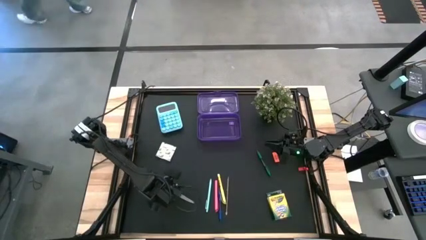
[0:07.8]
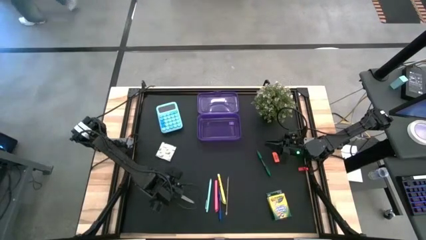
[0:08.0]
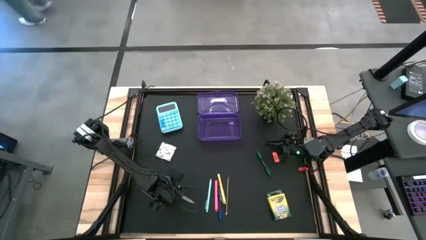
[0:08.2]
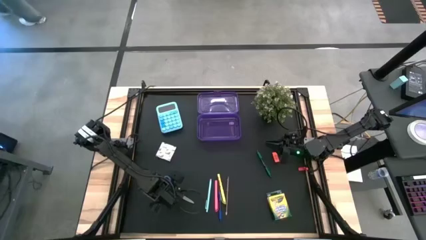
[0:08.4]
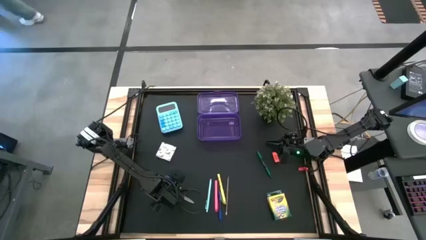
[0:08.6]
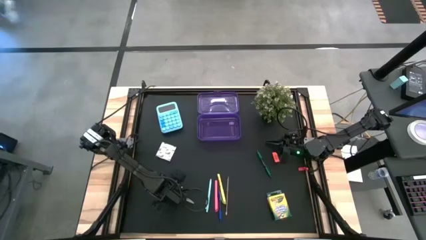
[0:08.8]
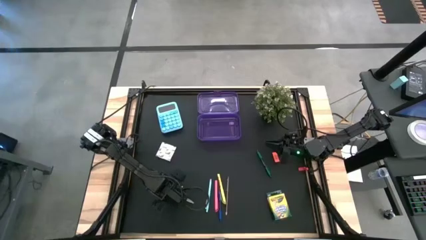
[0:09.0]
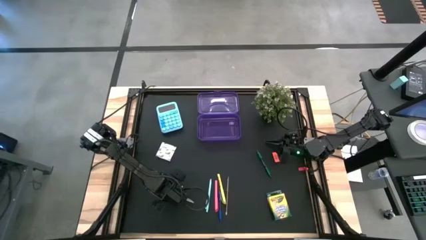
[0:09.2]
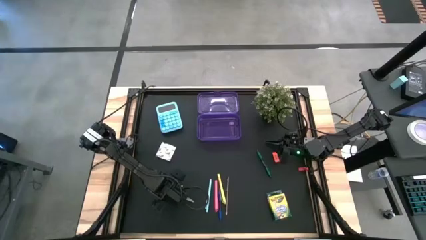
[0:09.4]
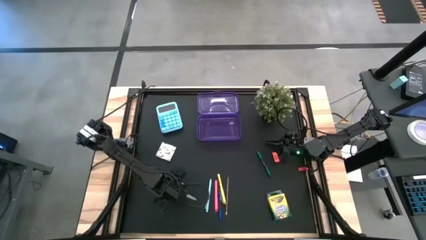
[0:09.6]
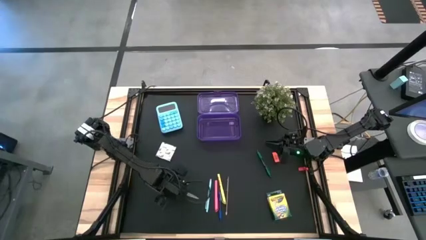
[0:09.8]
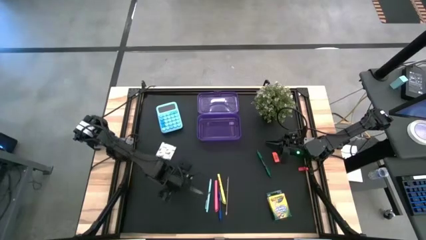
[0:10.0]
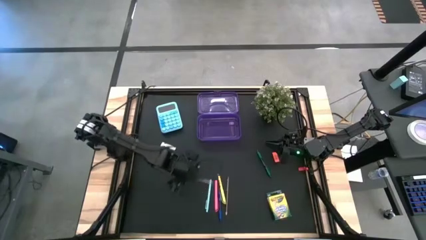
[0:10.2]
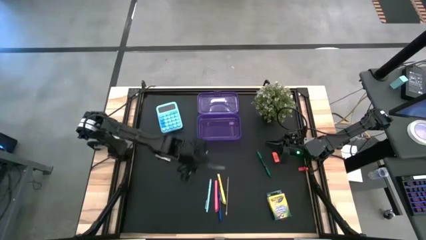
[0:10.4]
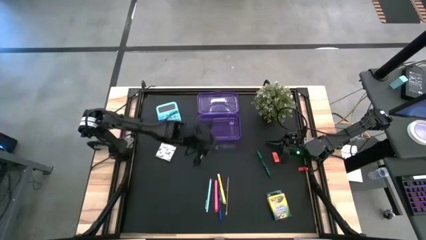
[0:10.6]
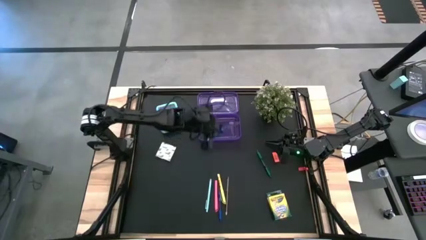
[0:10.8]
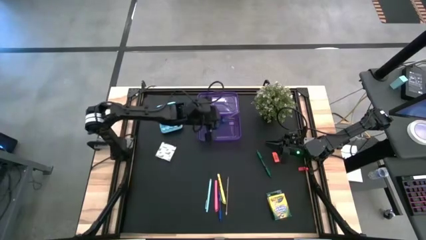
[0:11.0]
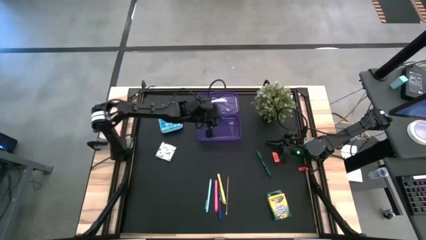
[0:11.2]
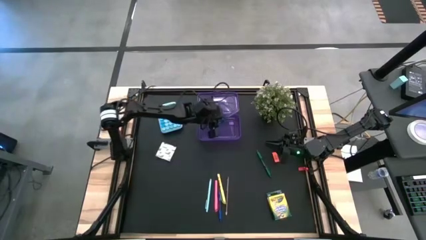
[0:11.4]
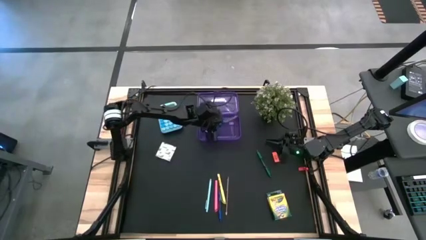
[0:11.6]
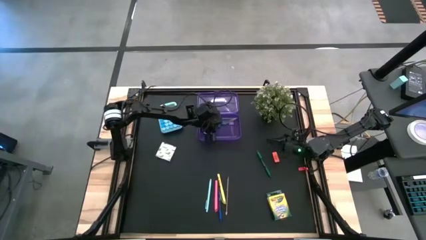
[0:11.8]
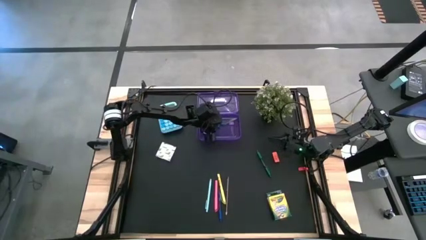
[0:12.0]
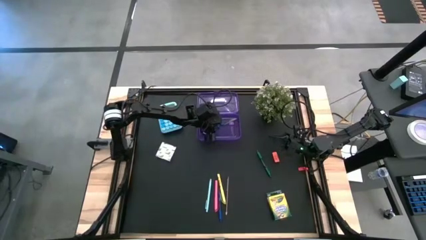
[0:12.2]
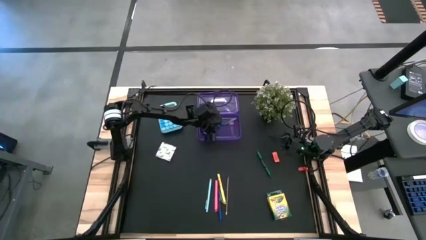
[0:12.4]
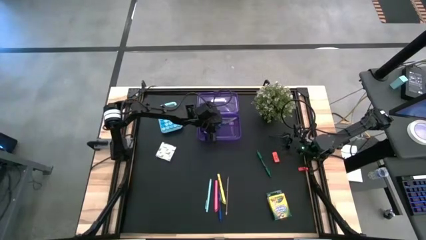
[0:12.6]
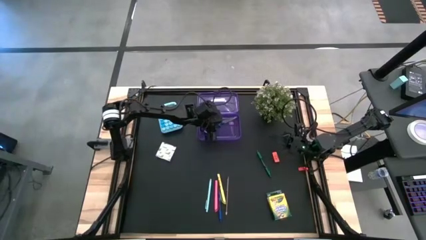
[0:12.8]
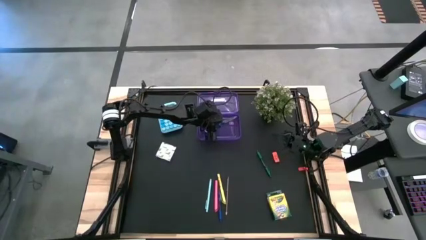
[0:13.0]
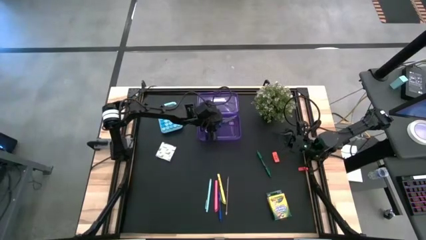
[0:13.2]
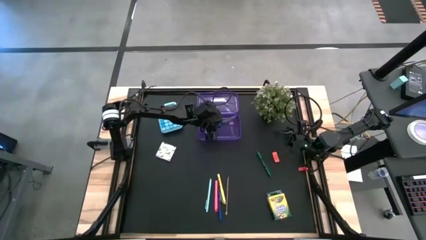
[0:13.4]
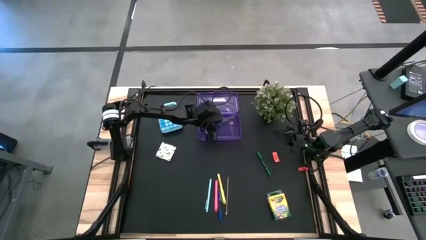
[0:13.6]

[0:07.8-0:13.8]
Task: Pack school essentials
Put the blue scissors into the purple supply box

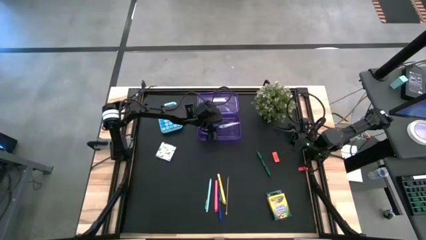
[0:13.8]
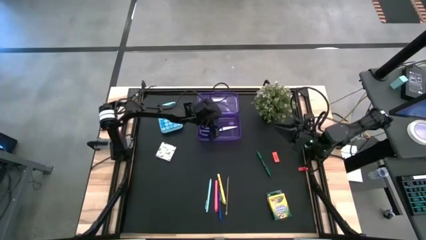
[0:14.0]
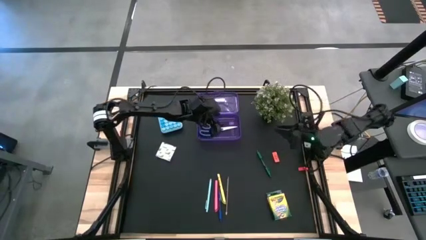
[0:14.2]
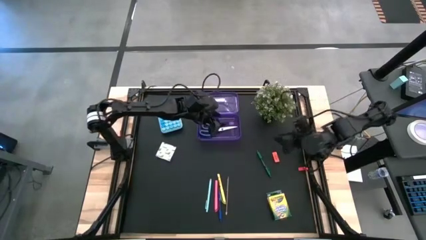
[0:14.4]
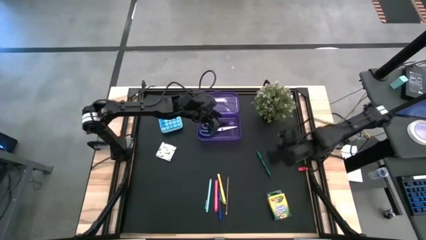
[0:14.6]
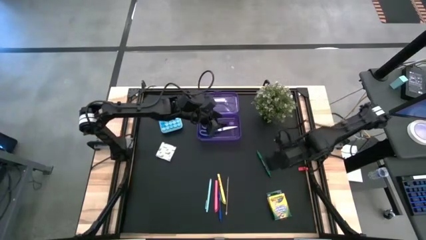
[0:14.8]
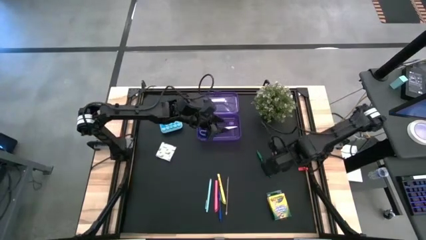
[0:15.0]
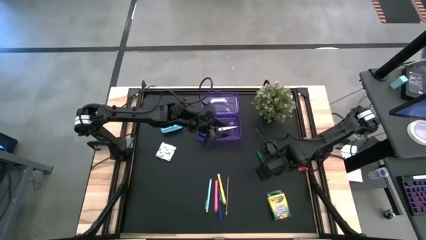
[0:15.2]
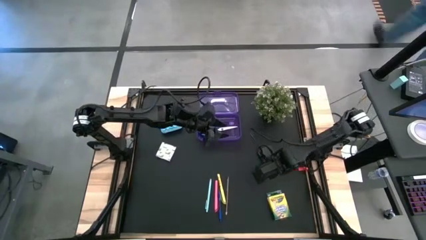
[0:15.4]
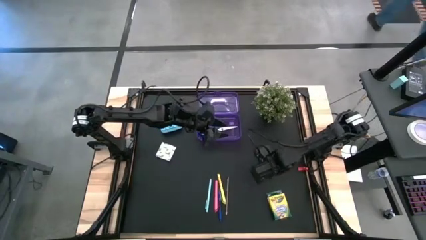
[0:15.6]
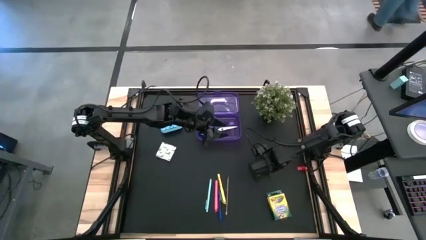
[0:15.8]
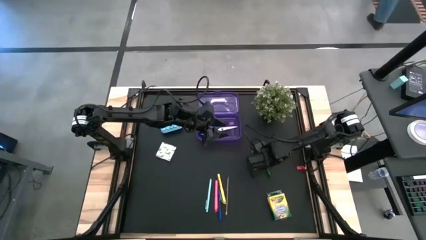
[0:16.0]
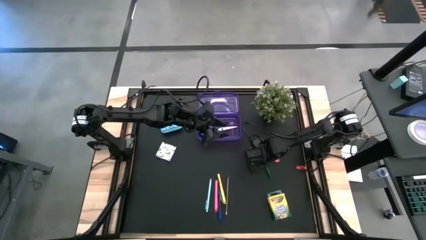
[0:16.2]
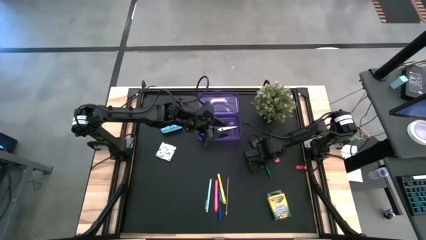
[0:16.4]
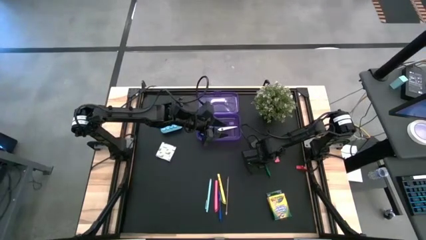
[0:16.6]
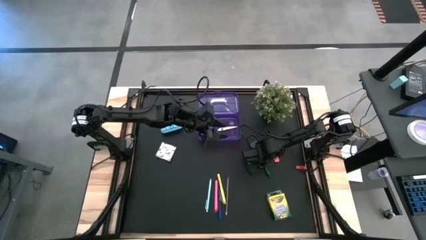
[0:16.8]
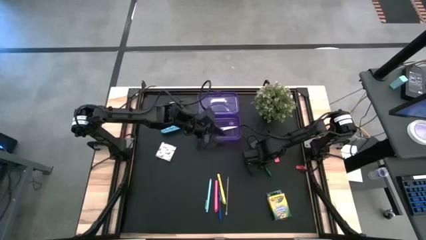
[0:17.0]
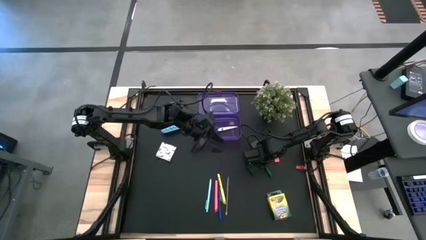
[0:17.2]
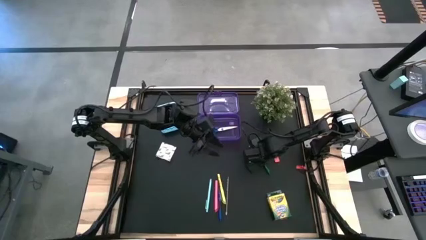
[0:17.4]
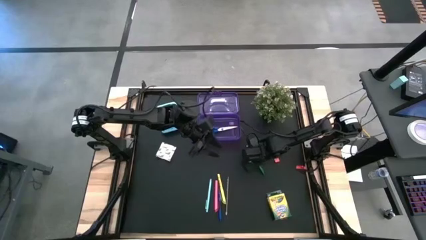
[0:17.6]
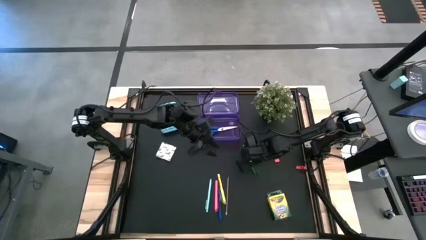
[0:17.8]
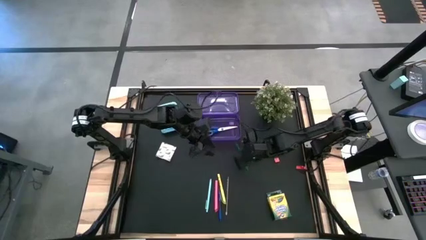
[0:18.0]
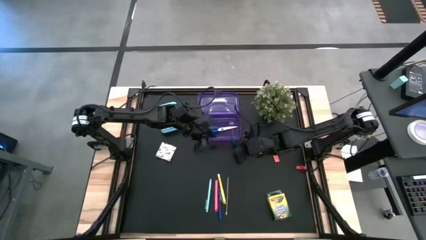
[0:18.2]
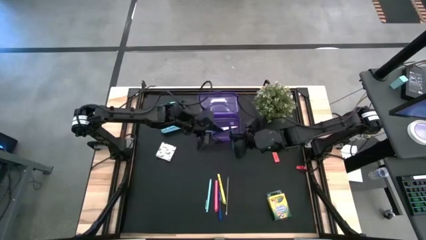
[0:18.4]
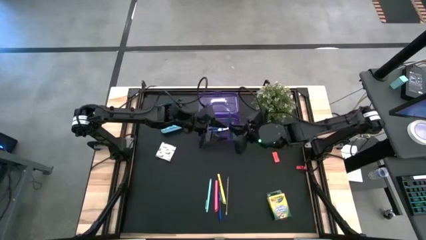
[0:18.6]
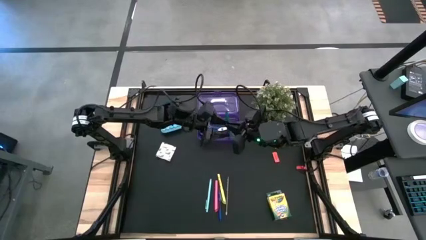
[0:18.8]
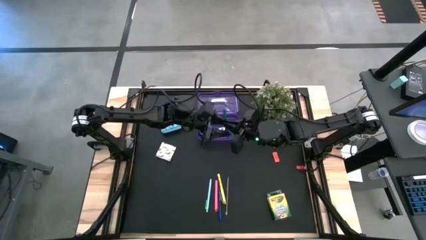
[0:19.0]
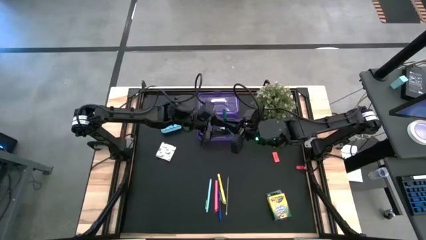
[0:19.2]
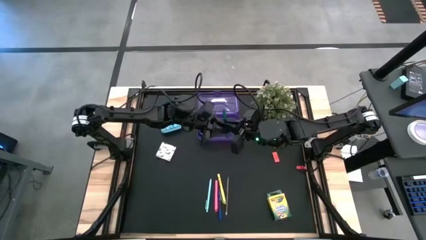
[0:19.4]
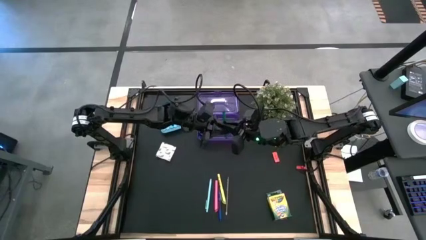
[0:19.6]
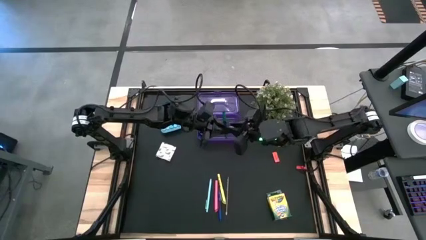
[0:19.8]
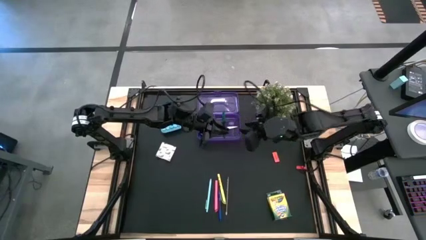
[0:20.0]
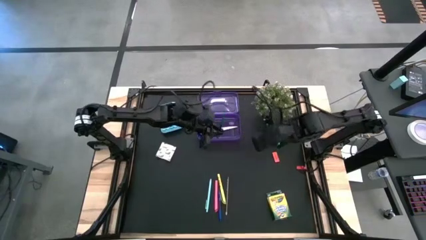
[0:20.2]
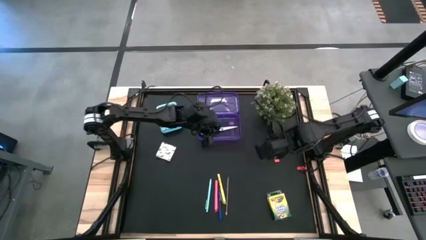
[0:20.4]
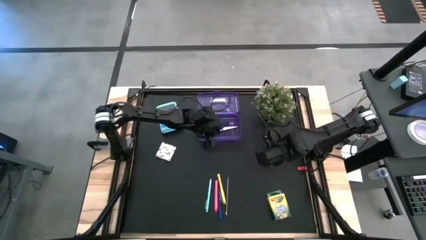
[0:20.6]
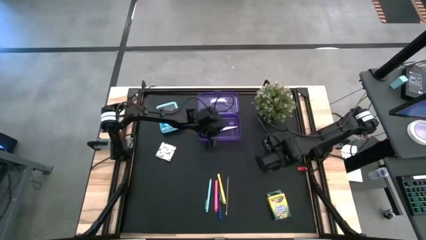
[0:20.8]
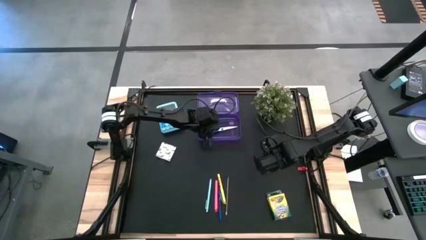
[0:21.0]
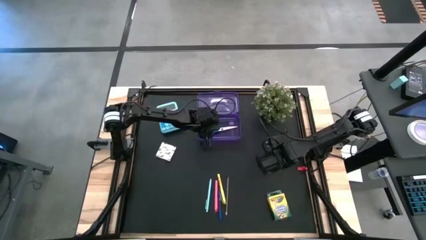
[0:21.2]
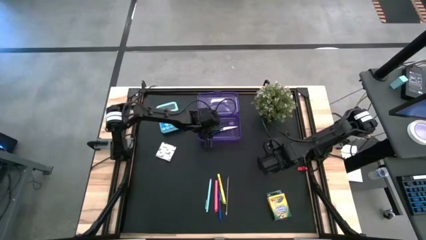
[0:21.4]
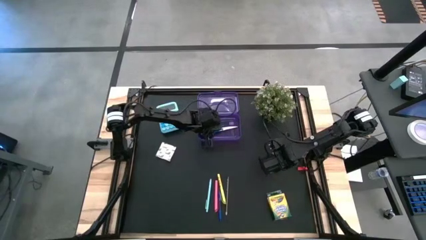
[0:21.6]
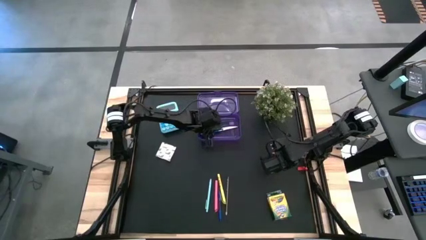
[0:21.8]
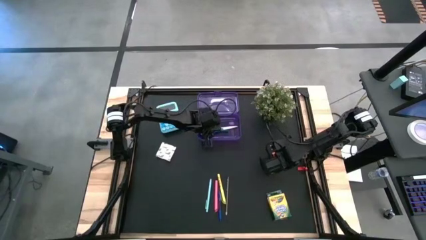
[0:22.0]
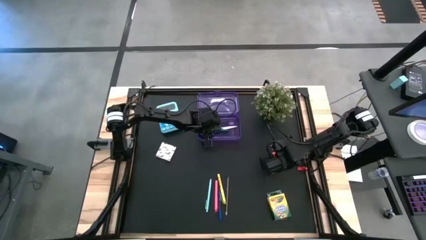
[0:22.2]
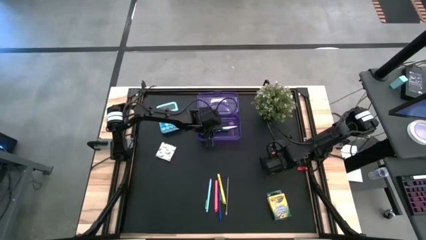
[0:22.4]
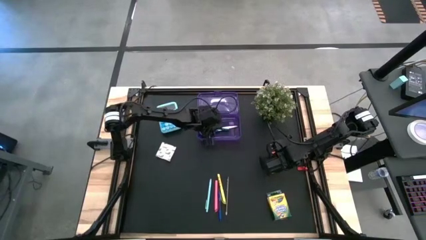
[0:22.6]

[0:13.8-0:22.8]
Put the green pen into the purple supply box
